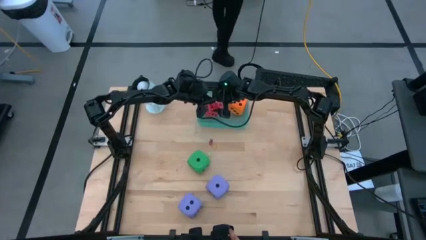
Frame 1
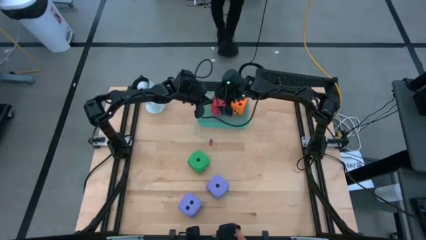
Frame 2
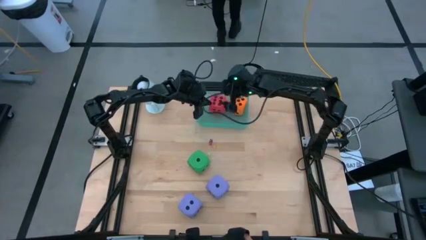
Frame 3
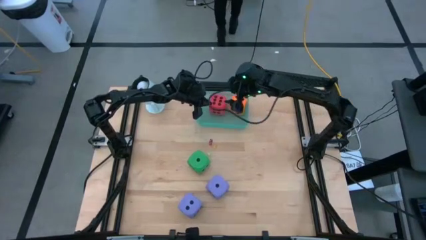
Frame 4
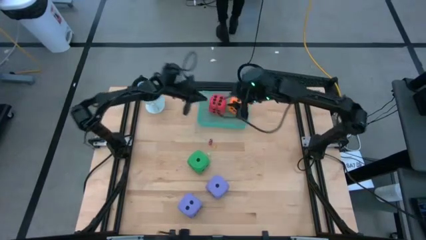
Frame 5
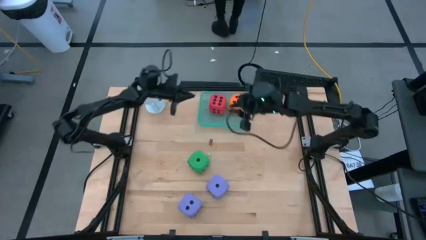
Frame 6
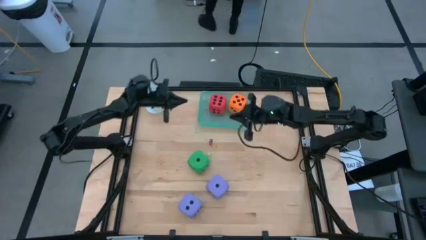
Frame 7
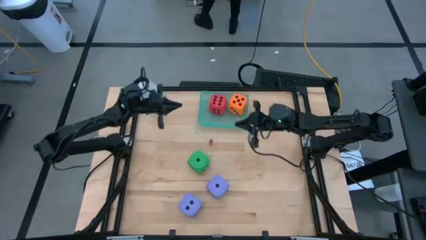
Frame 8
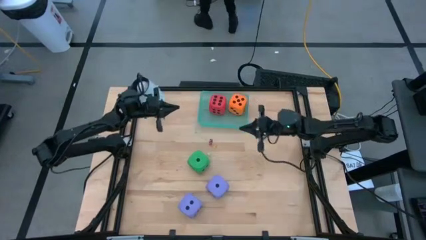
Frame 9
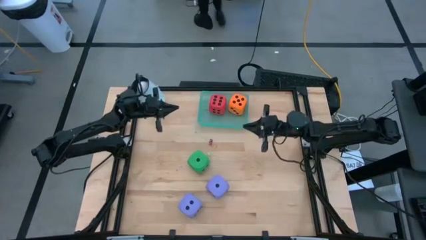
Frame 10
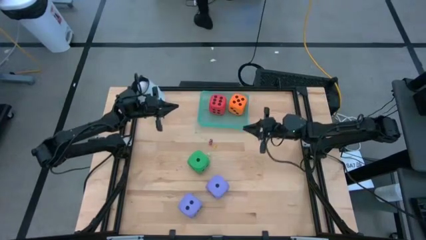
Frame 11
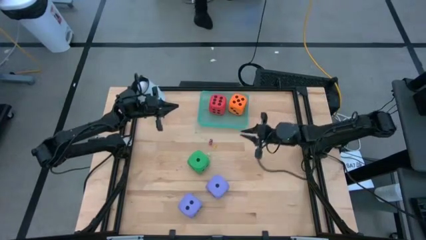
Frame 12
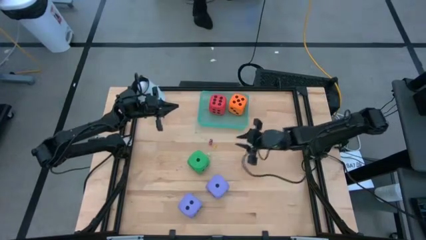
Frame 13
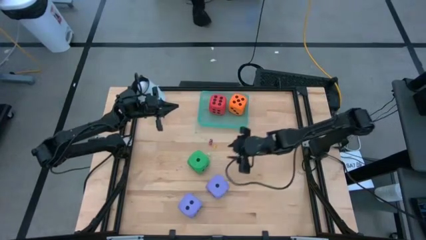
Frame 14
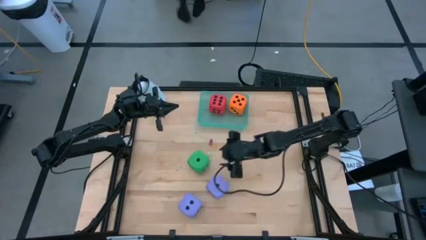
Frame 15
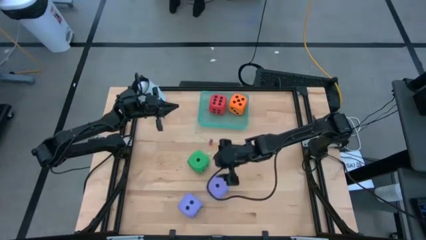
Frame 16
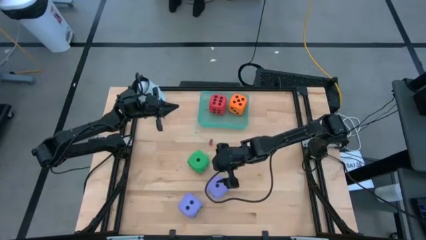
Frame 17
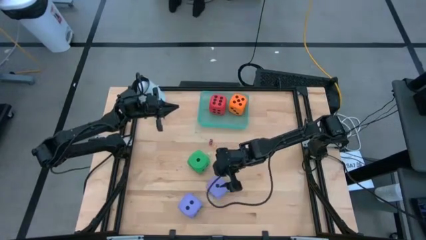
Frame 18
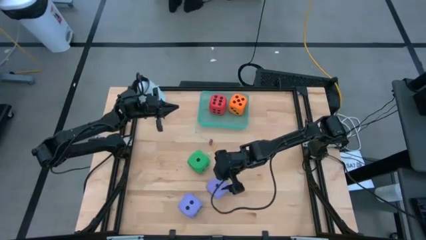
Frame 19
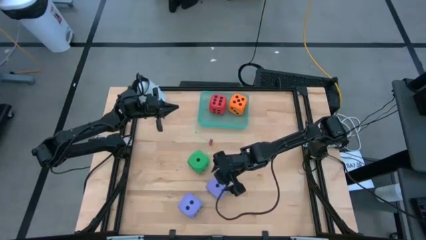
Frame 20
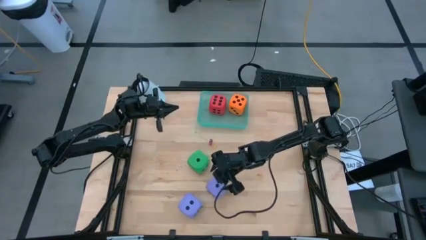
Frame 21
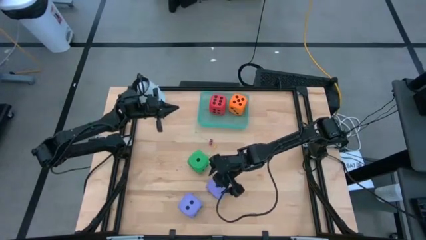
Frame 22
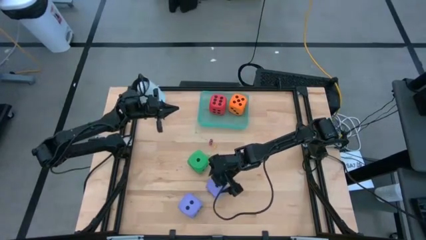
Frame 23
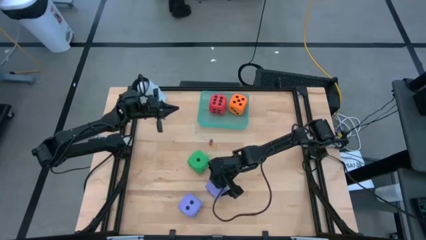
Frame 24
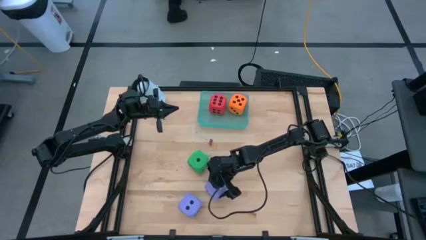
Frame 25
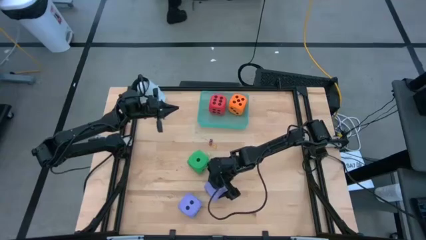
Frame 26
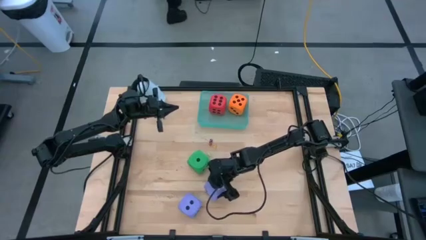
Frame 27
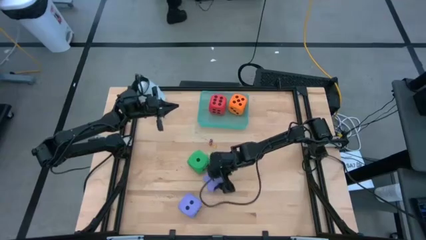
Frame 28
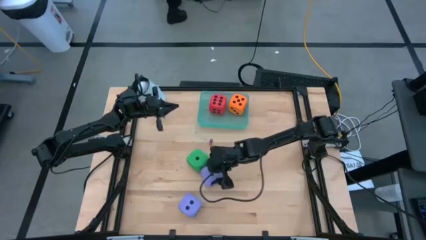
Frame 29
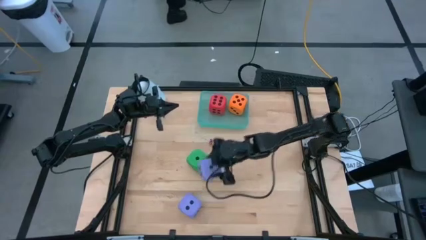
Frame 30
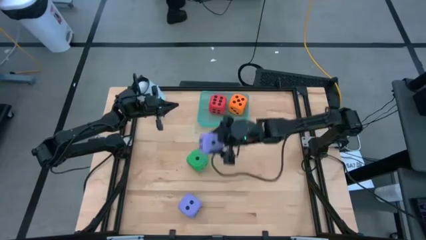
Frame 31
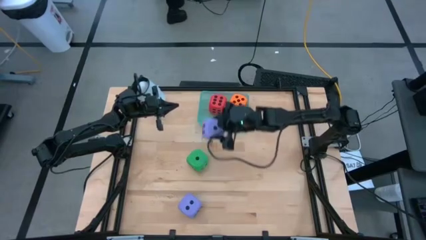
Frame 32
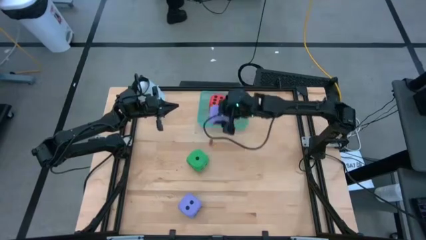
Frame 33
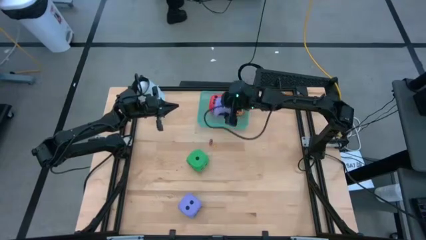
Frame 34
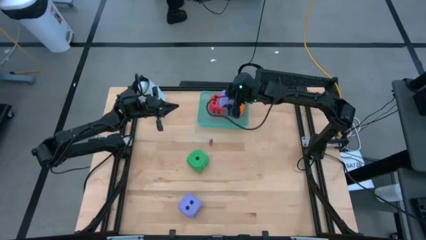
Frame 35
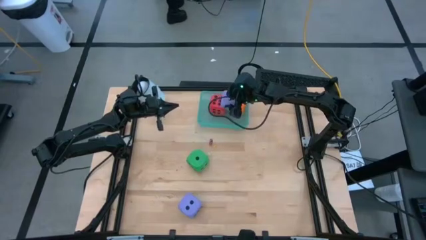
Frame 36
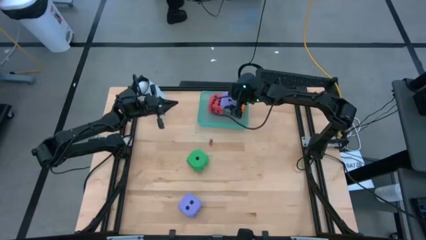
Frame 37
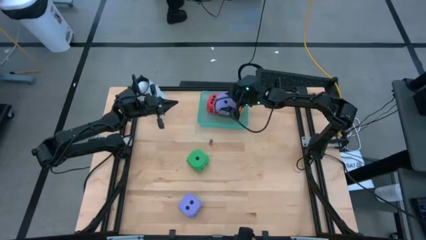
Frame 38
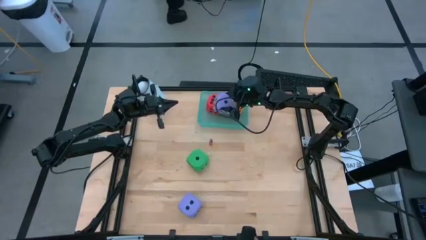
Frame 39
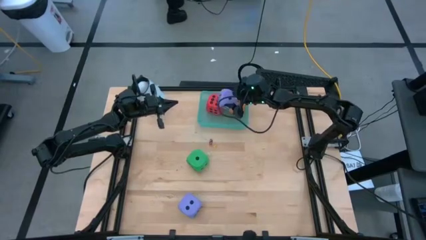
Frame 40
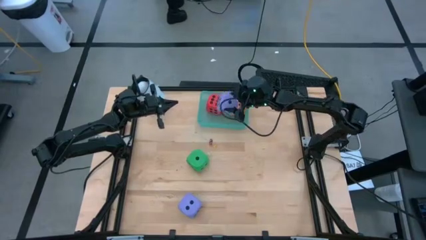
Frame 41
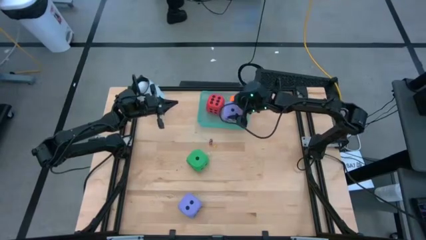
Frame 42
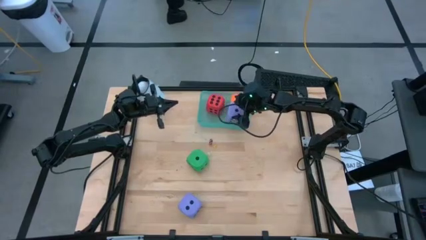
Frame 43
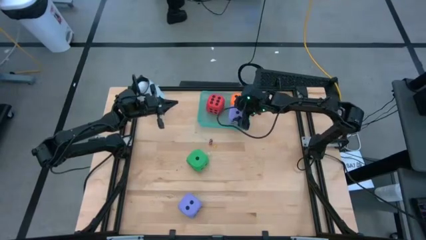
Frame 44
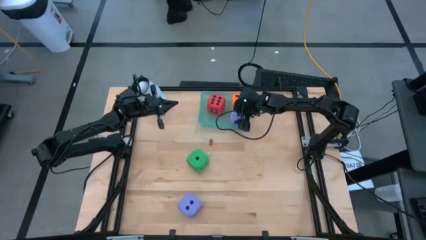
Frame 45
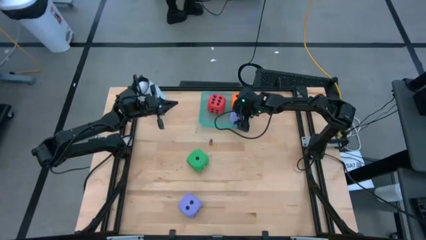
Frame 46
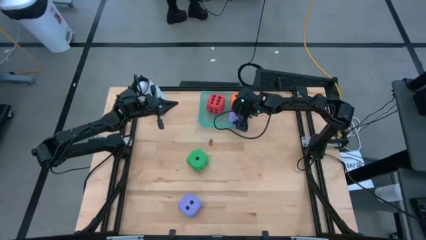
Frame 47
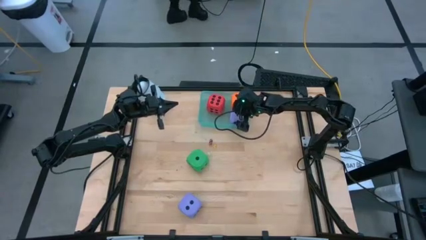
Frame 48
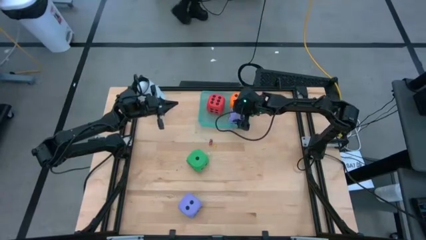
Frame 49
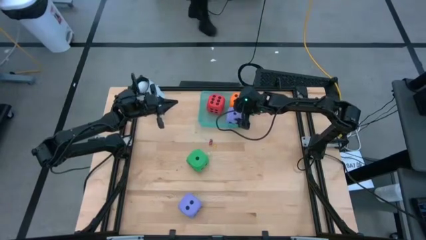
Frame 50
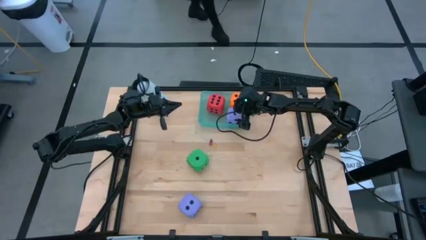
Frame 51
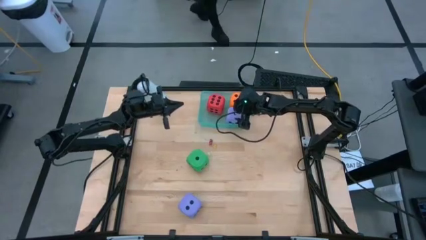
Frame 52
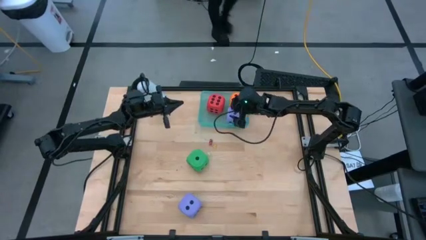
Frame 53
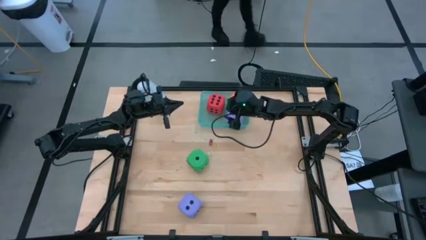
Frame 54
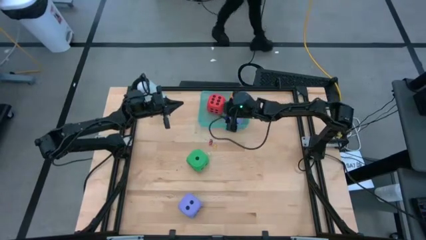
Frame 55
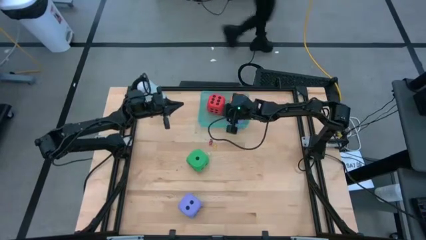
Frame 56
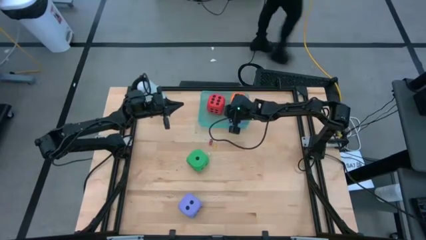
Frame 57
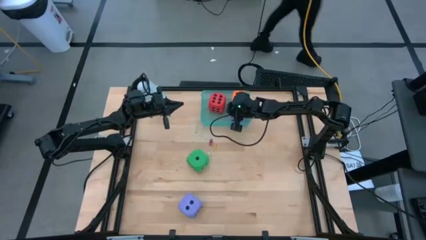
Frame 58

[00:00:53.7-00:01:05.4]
Task: Pick & Place Dice
Put the top big purple dice into the bin

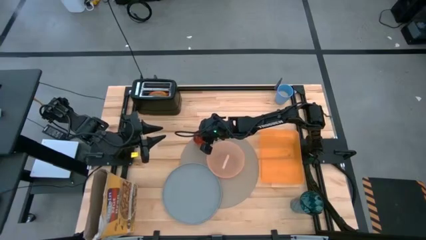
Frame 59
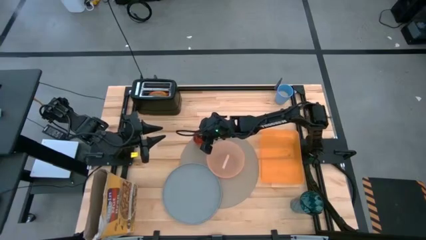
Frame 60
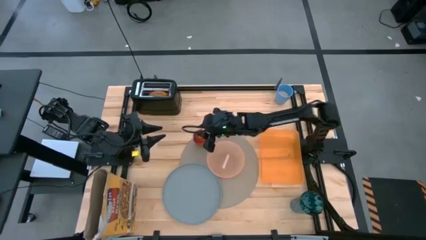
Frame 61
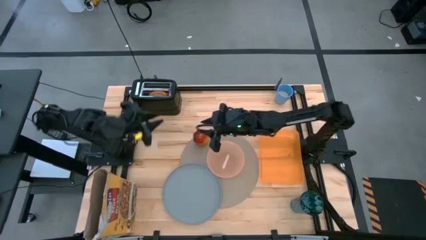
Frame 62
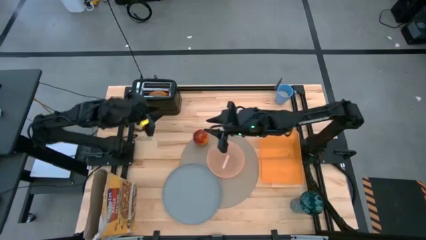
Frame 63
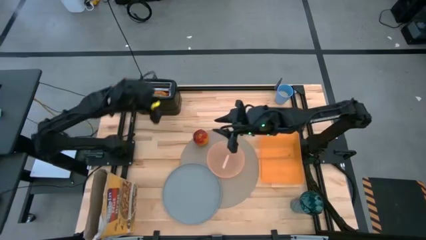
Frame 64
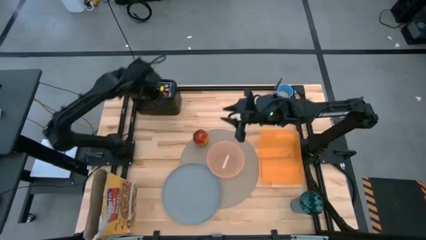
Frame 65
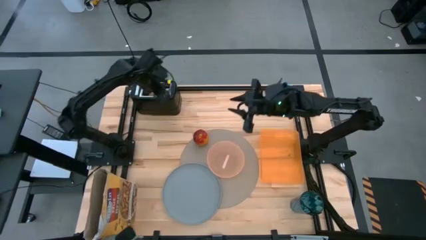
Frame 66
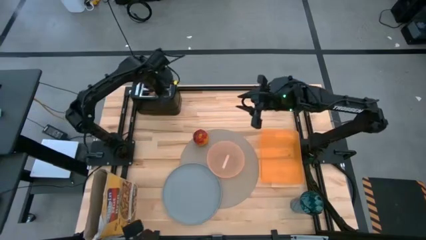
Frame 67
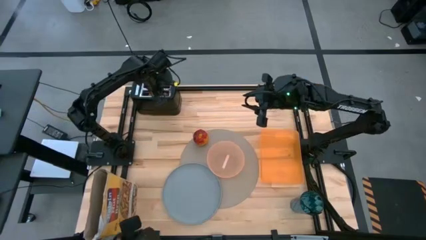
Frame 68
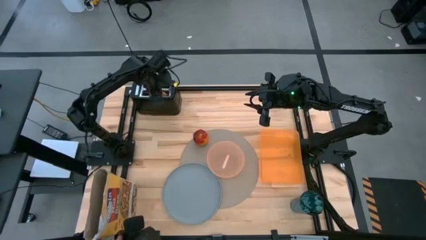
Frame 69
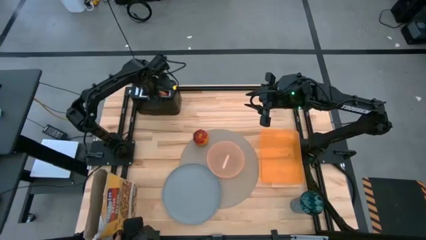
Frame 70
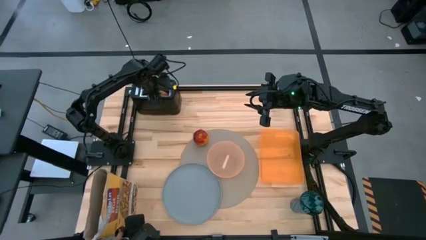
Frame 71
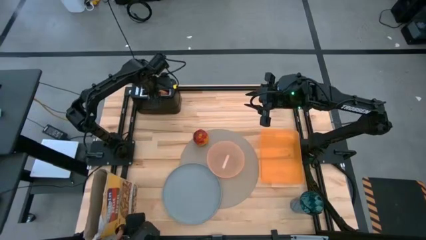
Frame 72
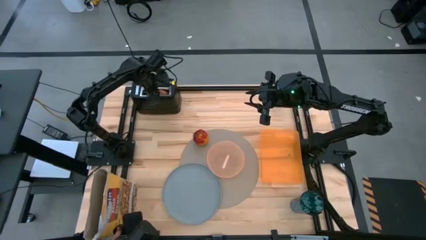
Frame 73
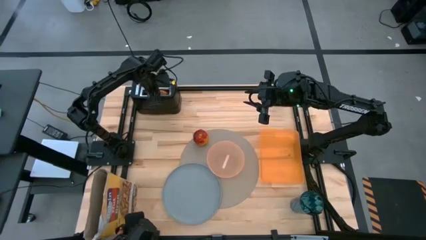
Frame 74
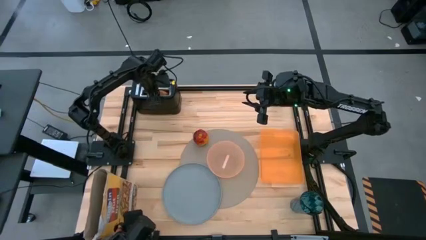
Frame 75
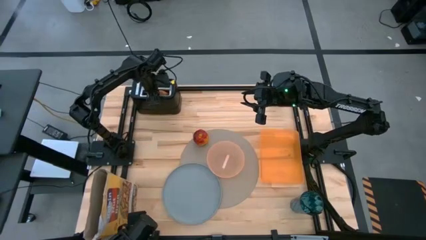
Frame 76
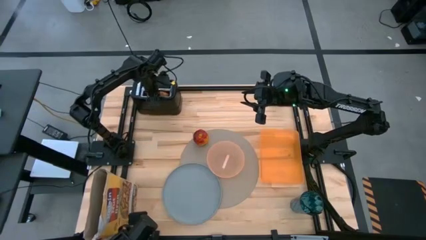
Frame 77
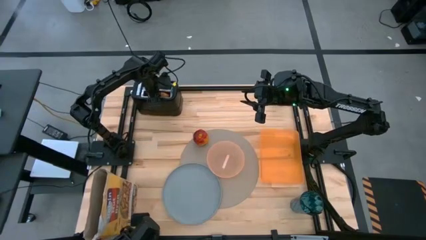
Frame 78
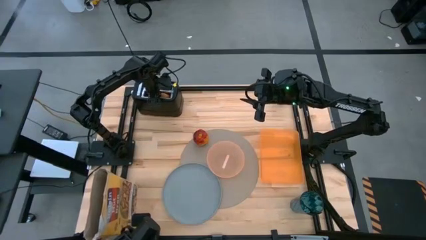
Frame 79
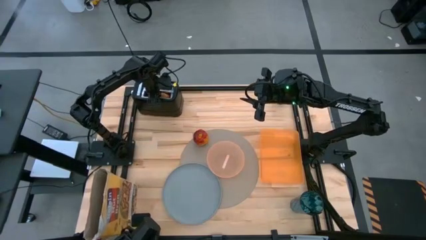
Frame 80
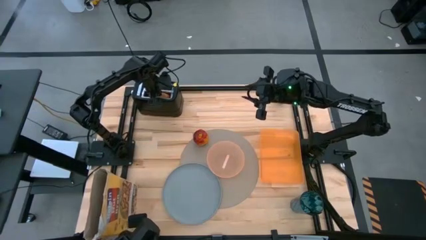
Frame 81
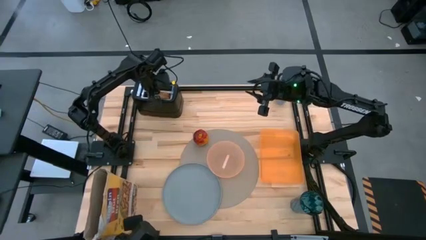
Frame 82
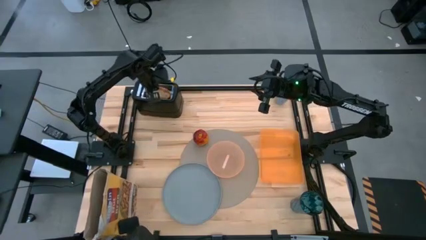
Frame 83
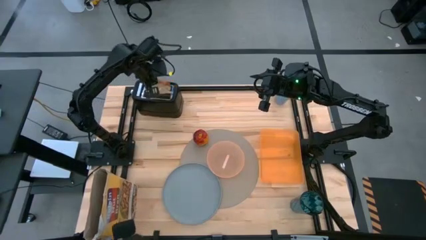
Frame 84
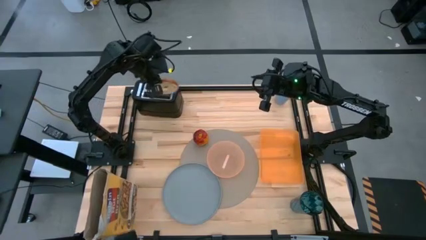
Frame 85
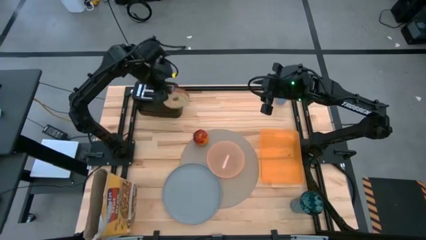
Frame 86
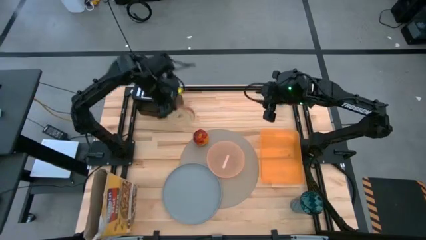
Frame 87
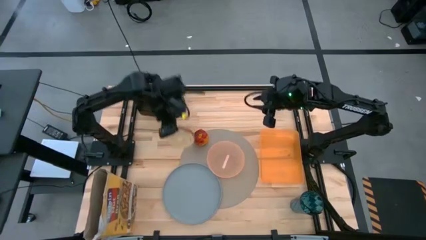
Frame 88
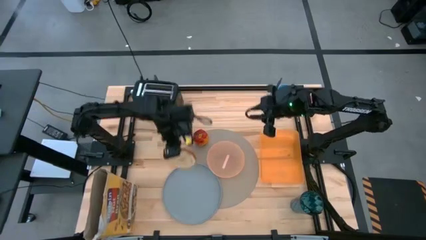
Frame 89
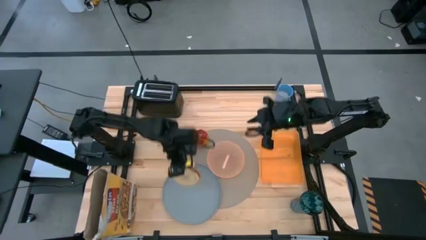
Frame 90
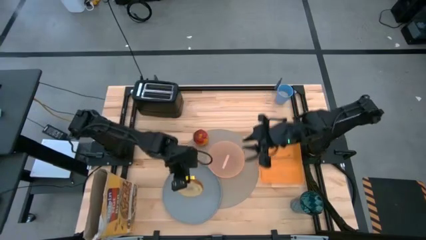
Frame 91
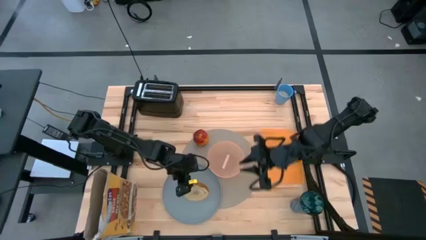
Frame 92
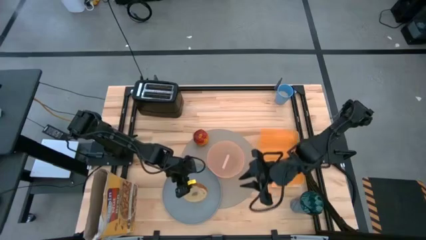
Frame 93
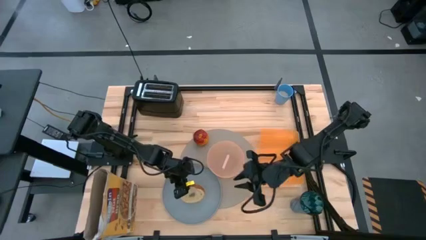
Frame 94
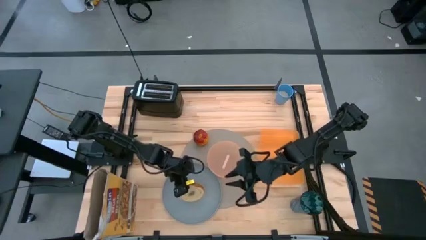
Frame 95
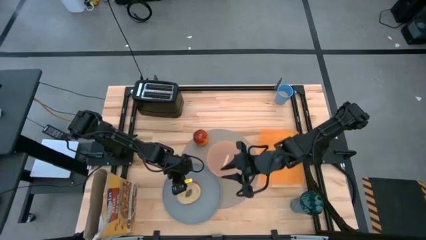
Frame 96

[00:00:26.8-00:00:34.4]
Task: Arrange a breakfast setting
Put the brown toasted bread on the blue plate
